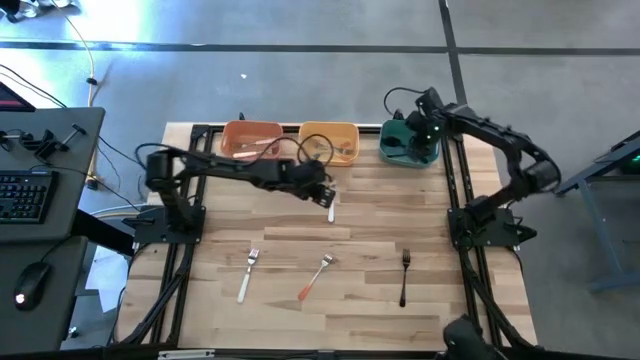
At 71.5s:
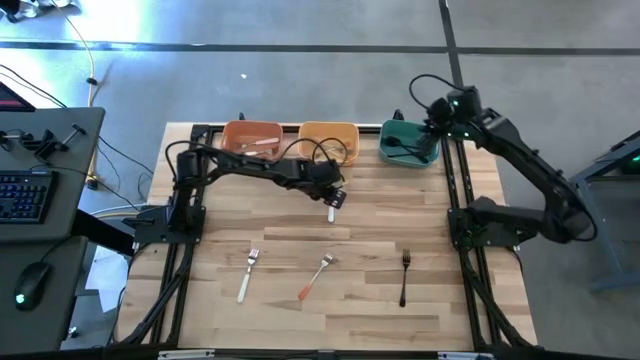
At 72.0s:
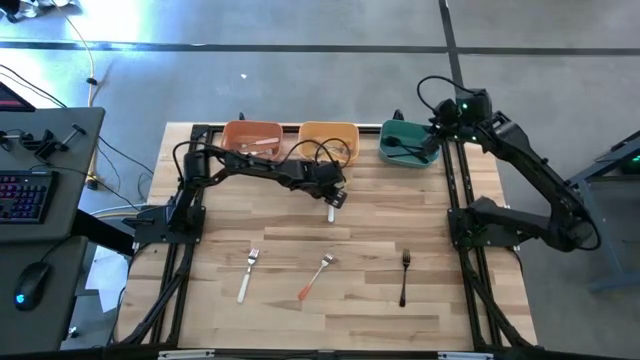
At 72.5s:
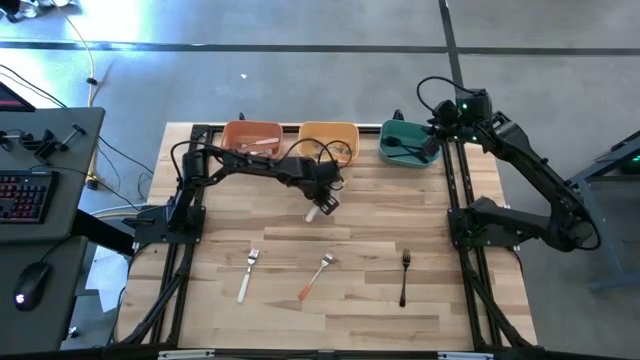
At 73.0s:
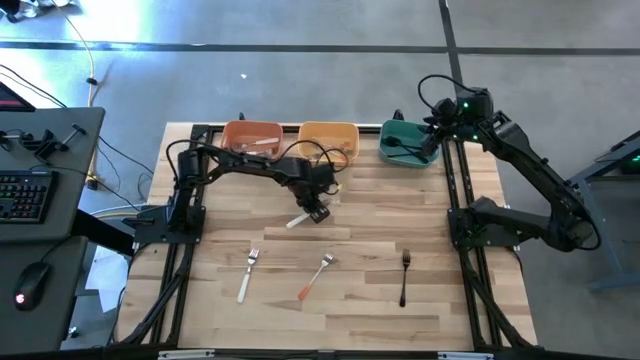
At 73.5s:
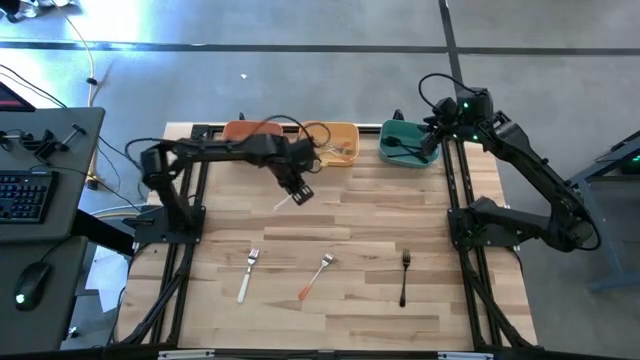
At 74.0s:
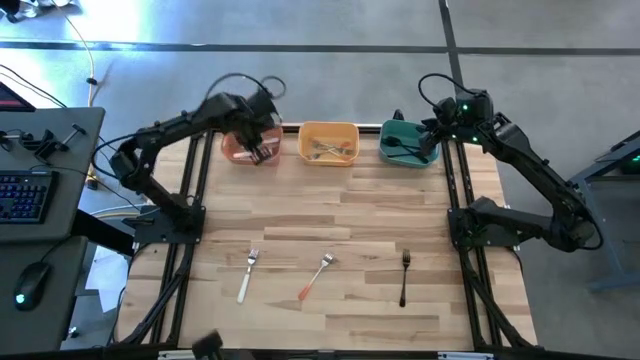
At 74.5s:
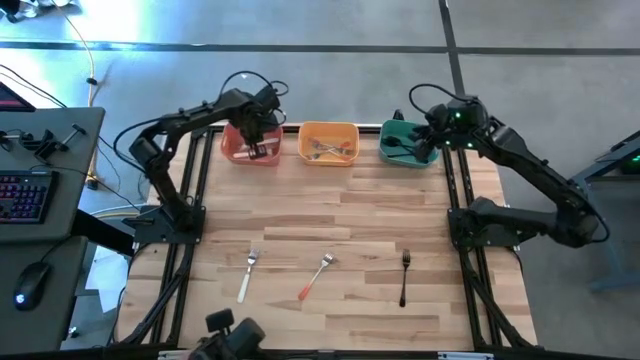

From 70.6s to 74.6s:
Task: Sort silverware by color (type)
Put the white fork into the orange bin

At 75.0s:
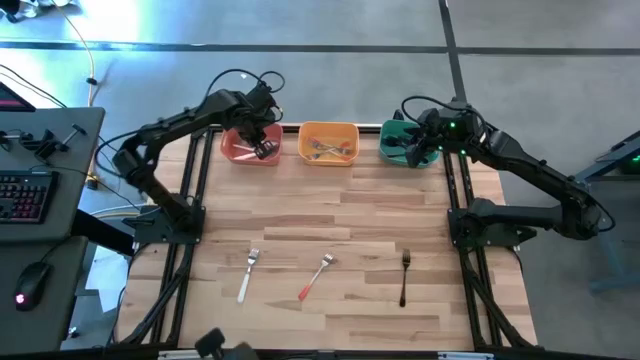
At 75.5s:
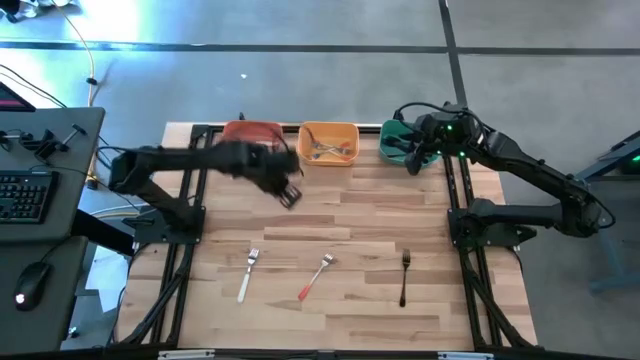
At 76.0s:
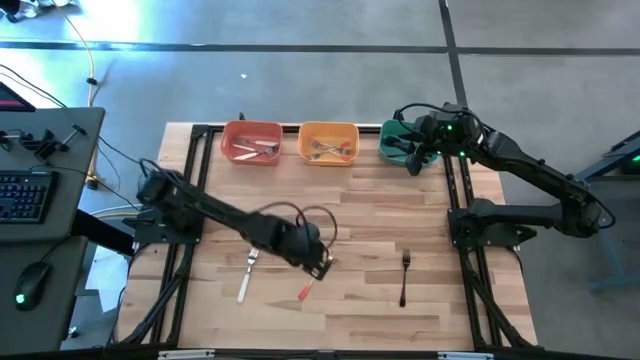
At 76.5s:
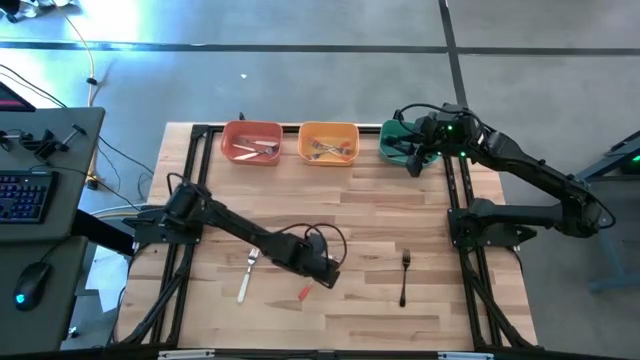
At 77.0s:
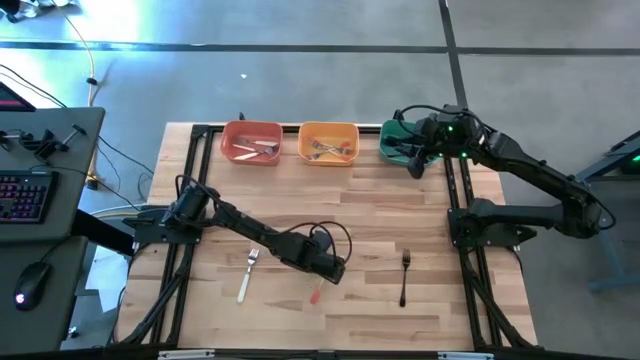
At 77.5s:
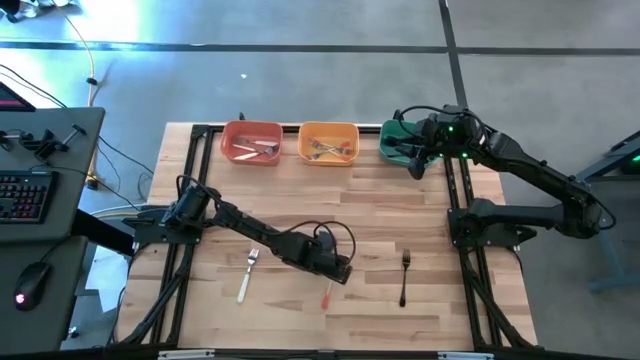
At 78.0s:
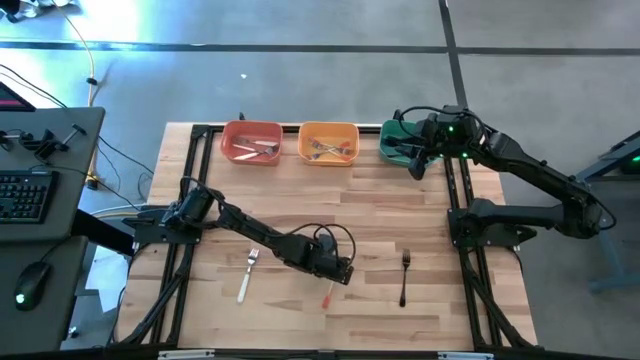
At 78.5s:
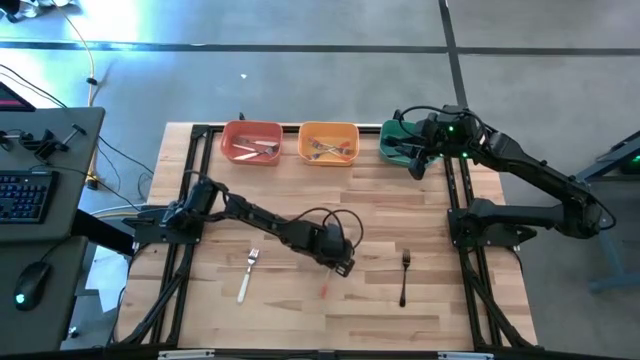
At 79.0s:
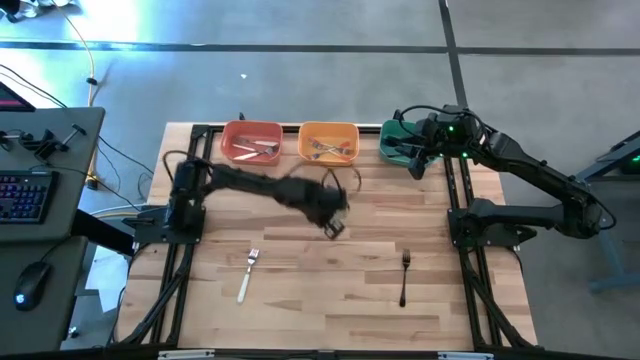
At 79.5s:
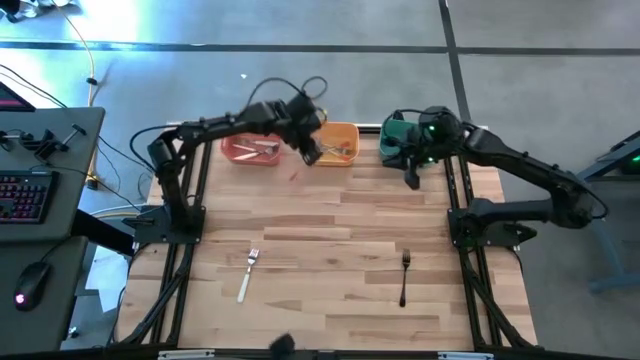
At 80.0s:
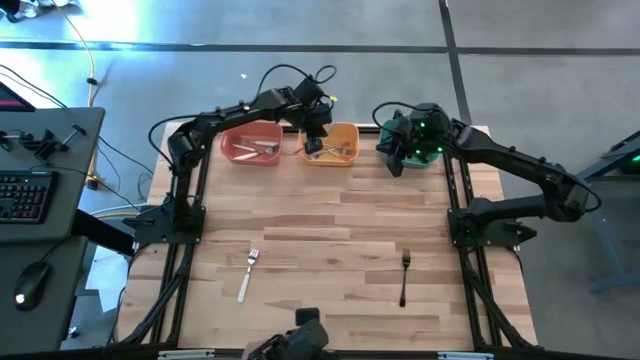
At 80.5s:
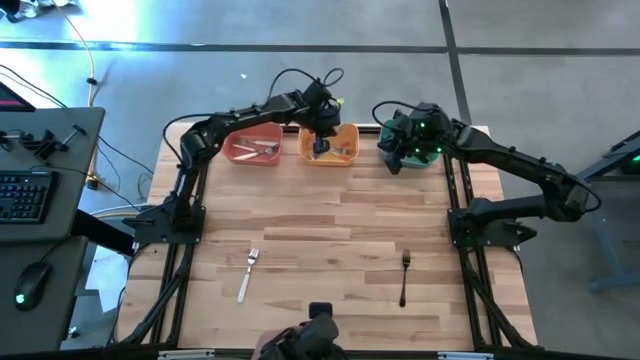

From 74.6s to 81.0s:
Put the orange fork into the yellow bin

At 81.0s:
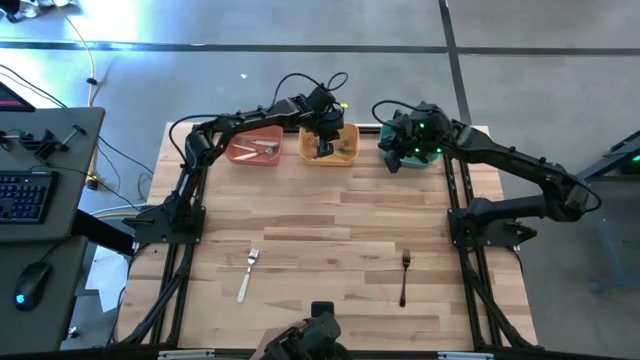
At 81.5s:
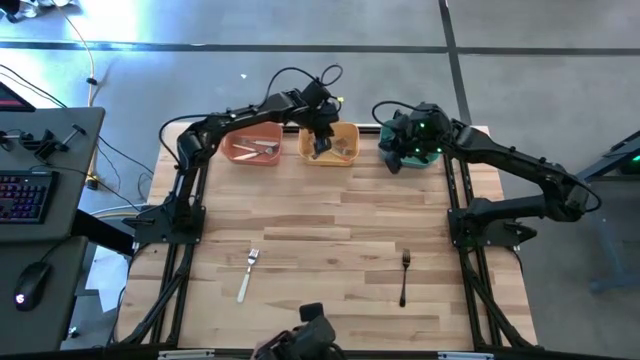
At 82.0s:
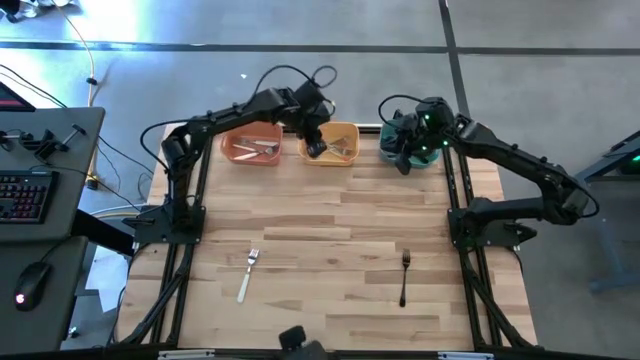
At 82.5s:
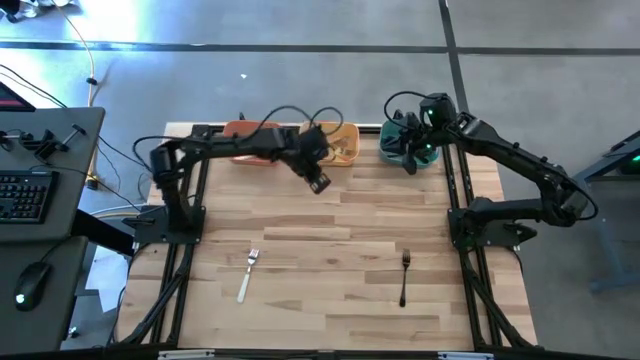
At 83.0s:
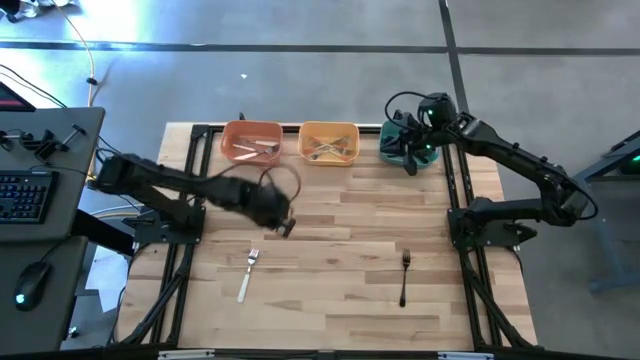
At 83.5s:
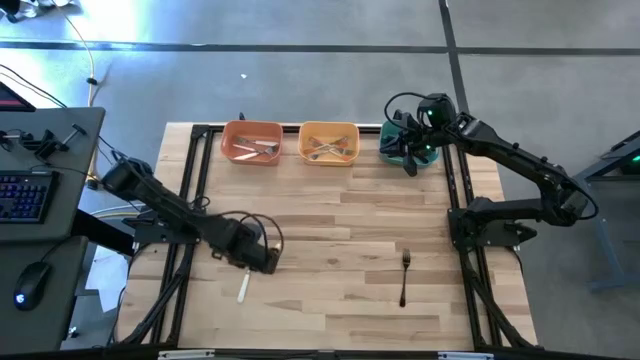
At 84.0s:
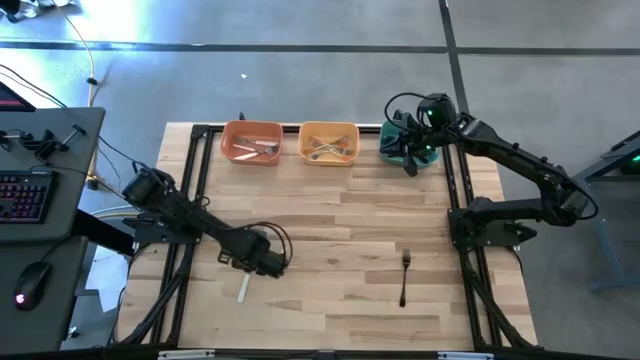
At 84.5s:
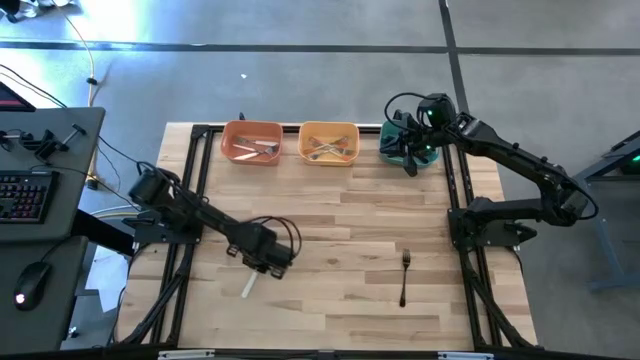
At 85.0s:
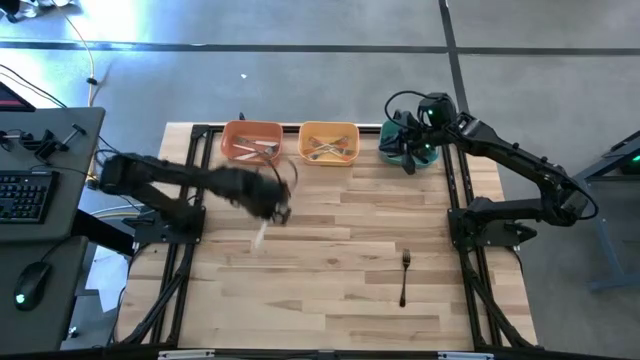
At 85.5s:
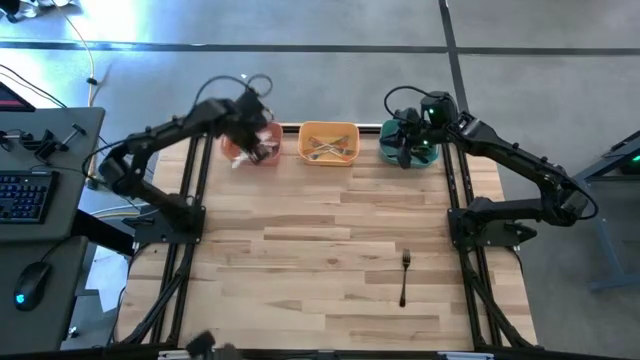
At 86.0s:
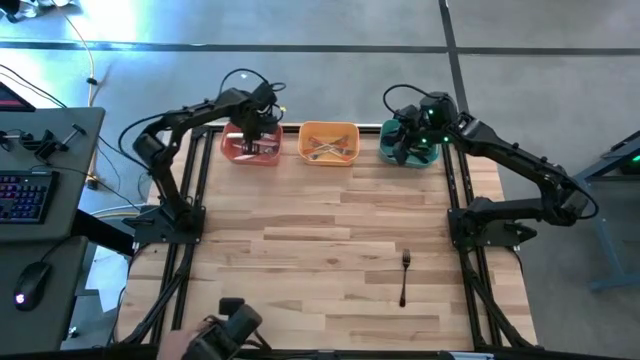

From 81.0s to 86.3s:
Put the white fork into the orange bin

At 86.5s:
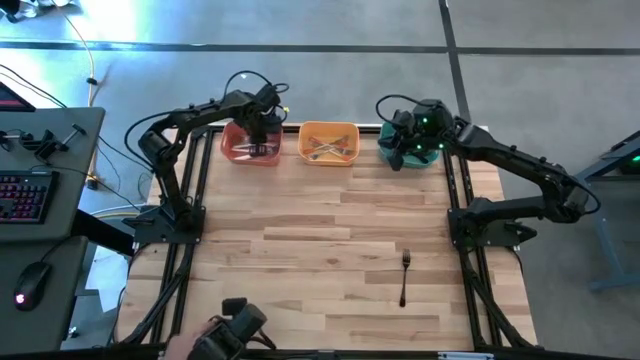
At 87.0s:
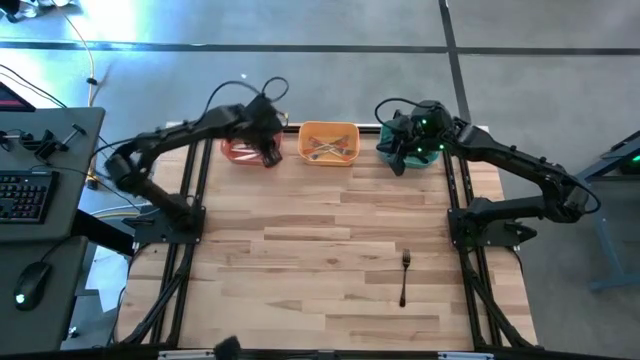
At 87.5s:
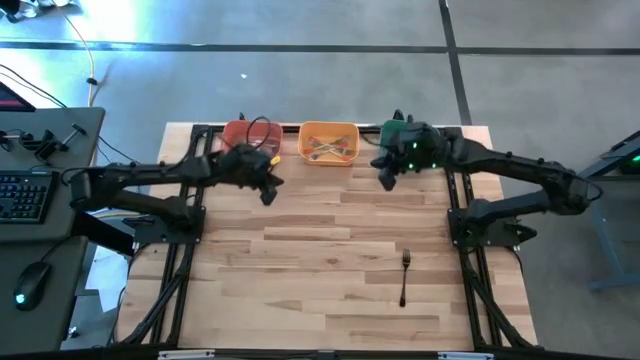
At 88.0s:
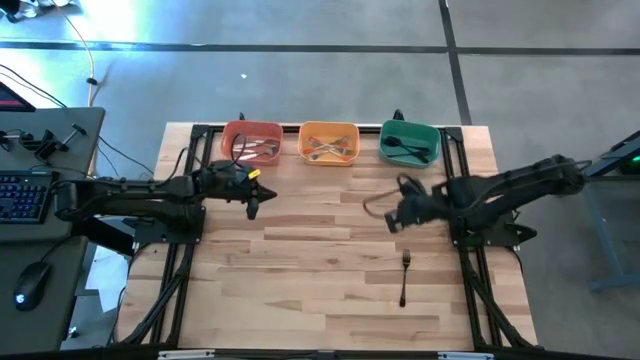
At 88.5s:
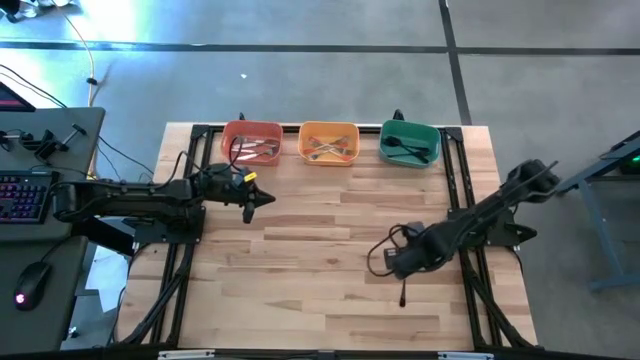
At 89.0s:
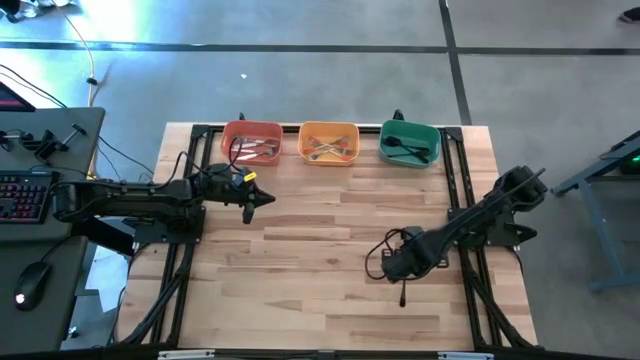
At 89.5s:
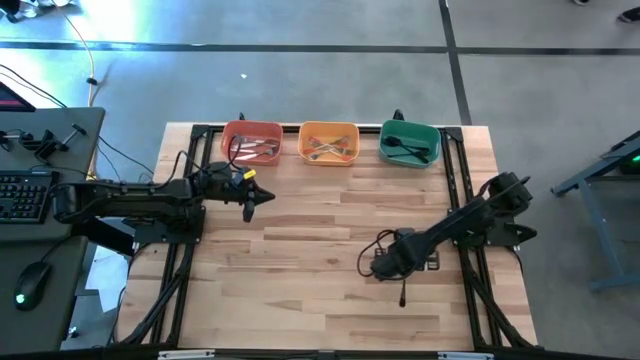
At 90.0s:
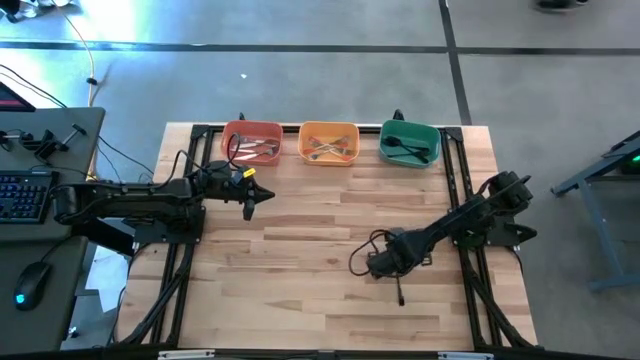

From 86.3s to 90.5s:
Put the black fork into the green bin

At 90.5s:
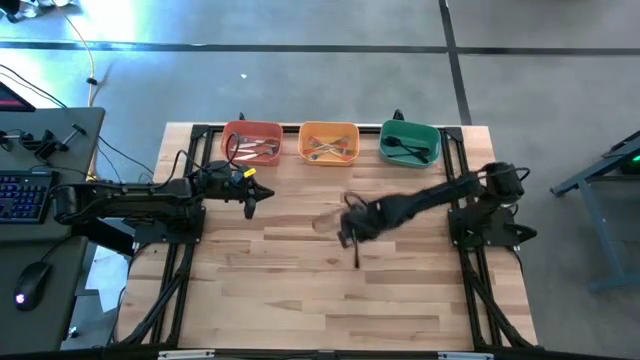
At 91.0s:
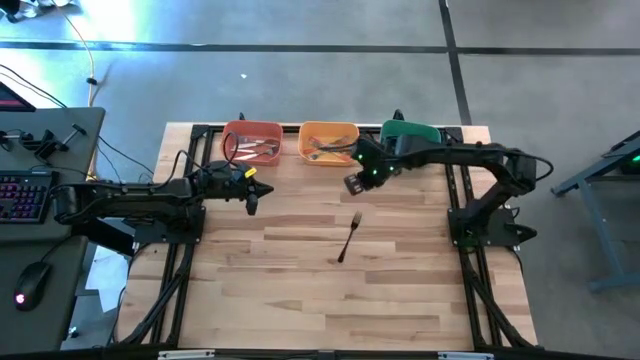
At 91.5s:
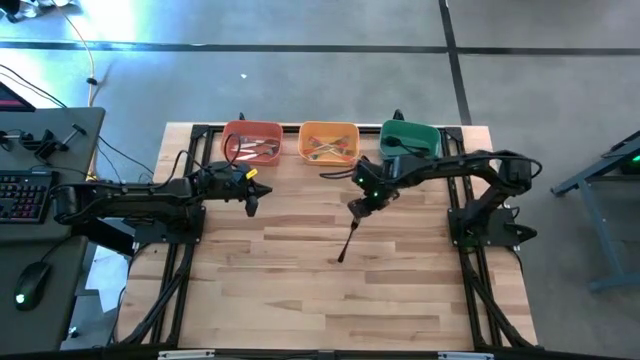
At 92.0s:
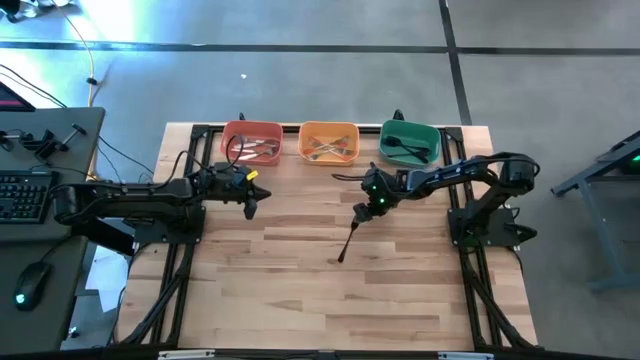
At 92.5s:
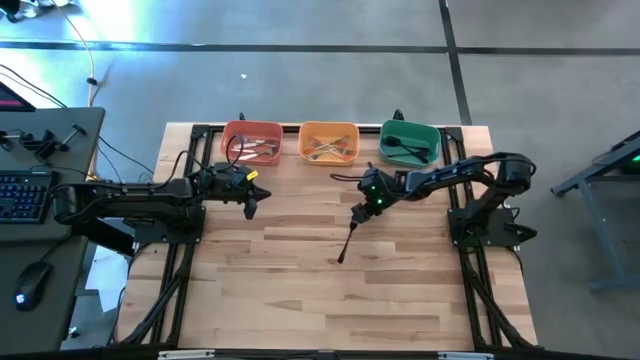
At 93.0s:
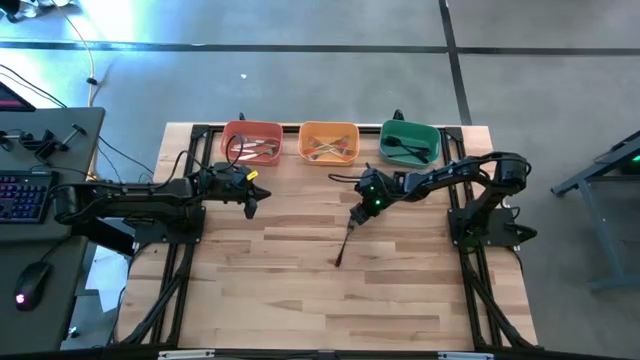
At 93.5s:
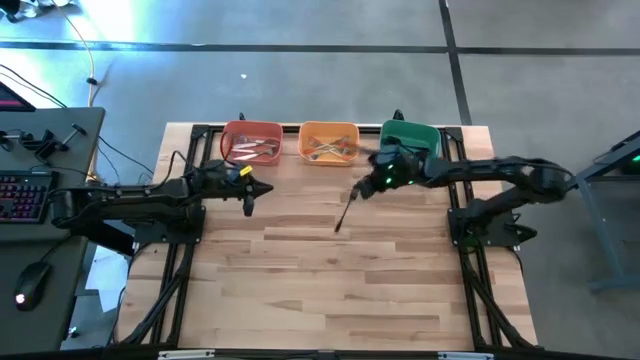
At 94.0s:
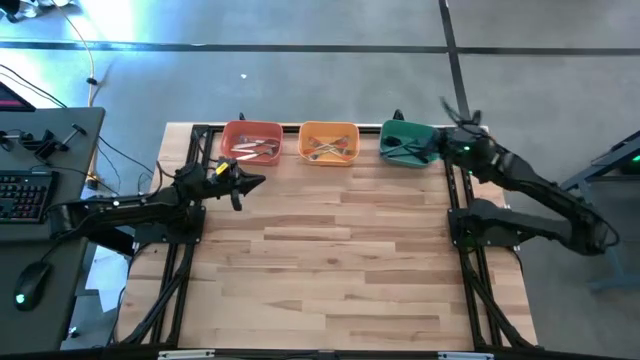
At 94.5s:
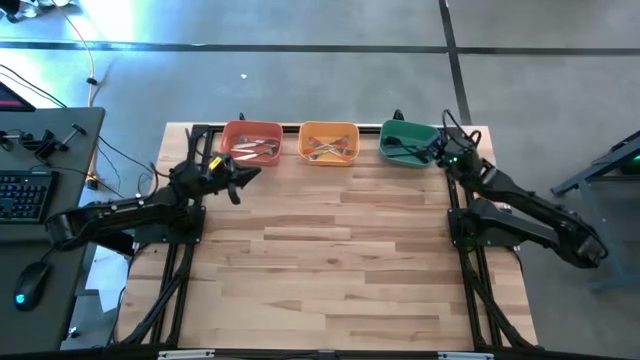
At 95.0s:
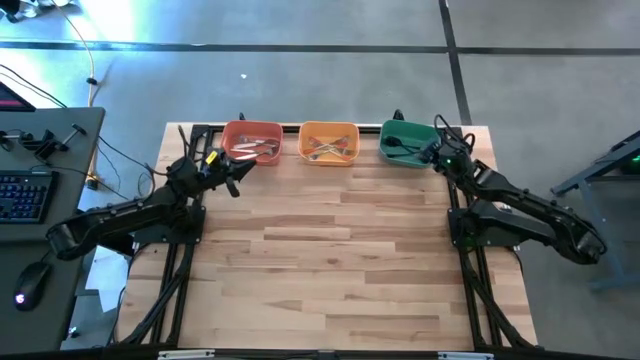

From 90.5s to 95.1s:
Put the black fork into the green bin
